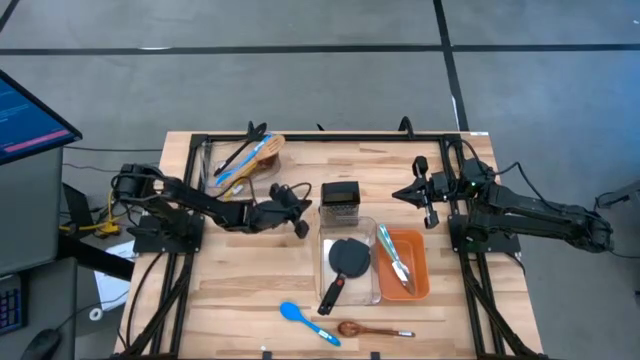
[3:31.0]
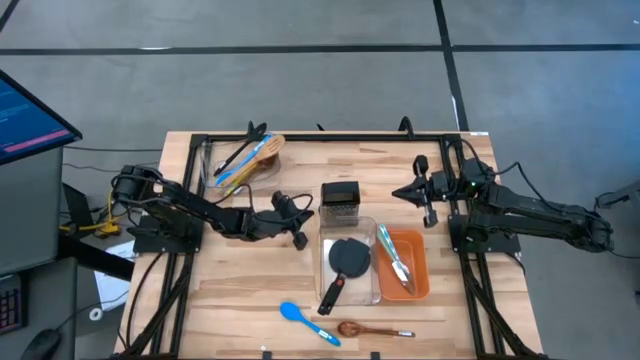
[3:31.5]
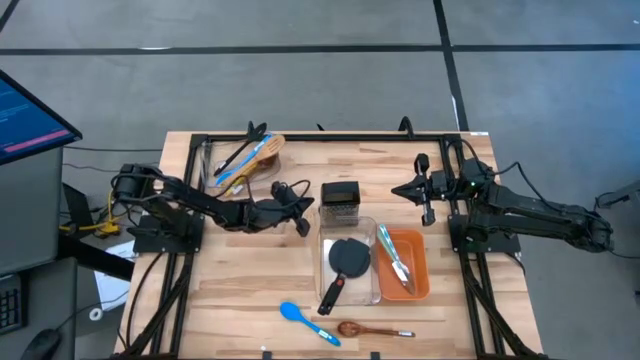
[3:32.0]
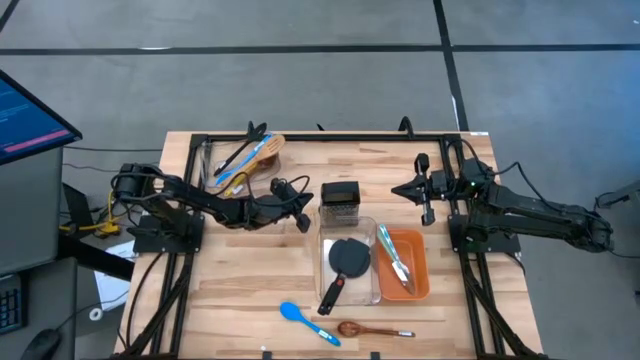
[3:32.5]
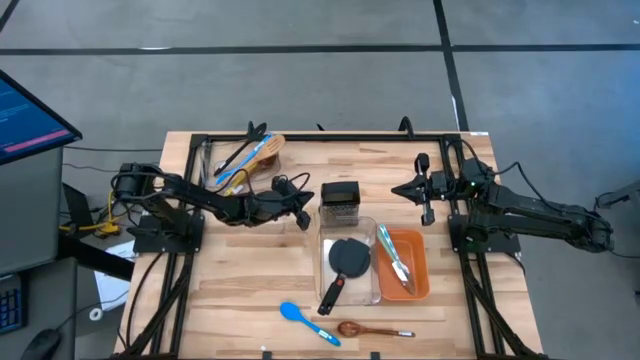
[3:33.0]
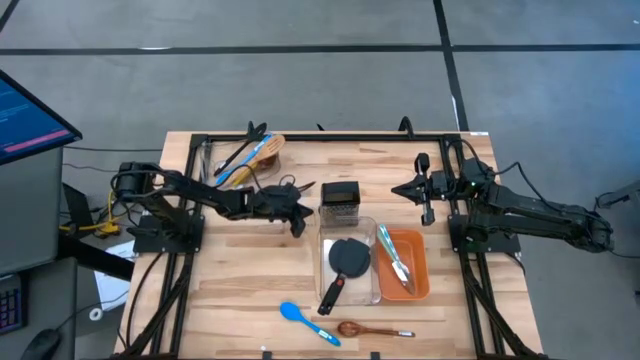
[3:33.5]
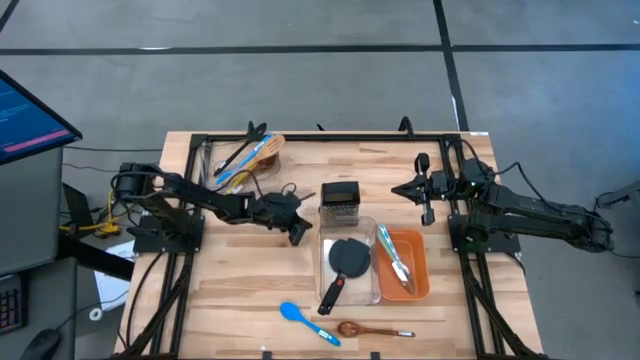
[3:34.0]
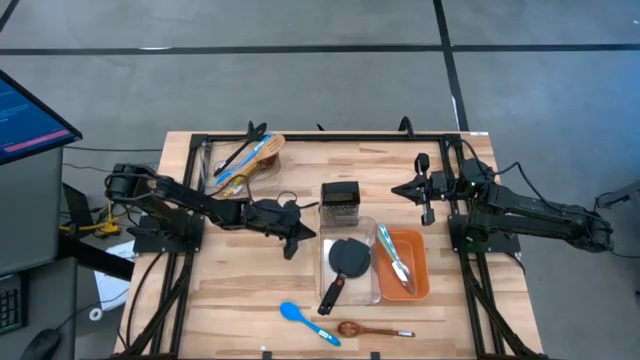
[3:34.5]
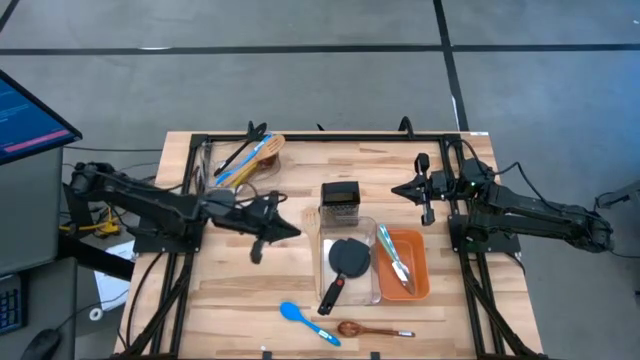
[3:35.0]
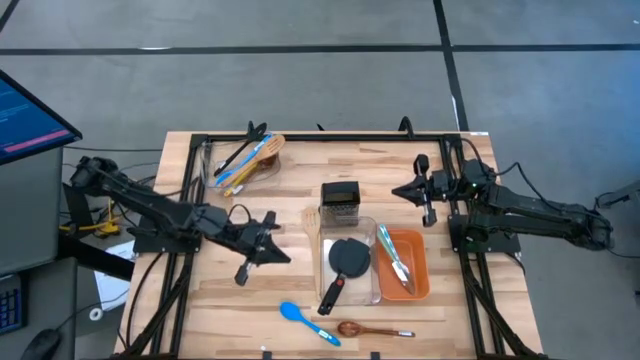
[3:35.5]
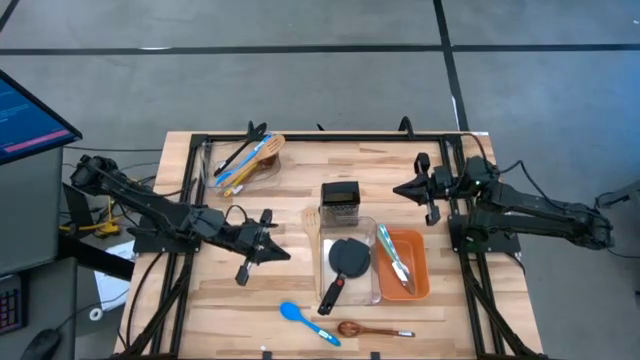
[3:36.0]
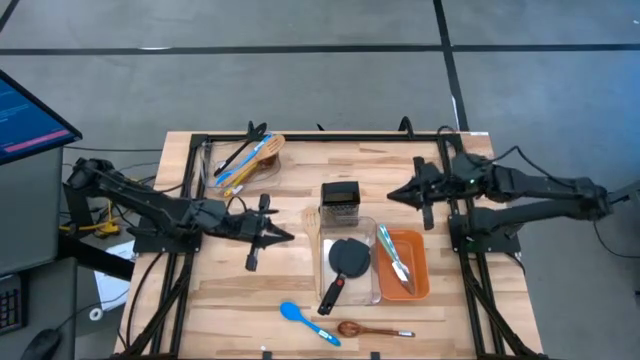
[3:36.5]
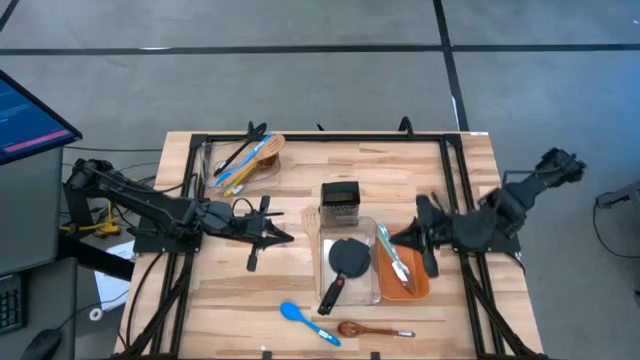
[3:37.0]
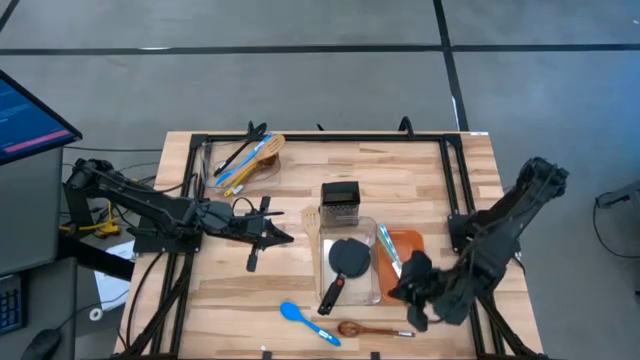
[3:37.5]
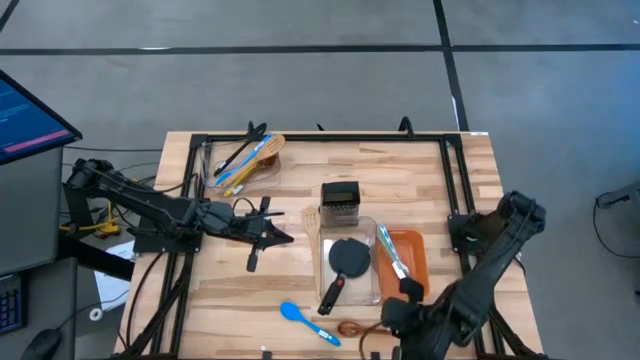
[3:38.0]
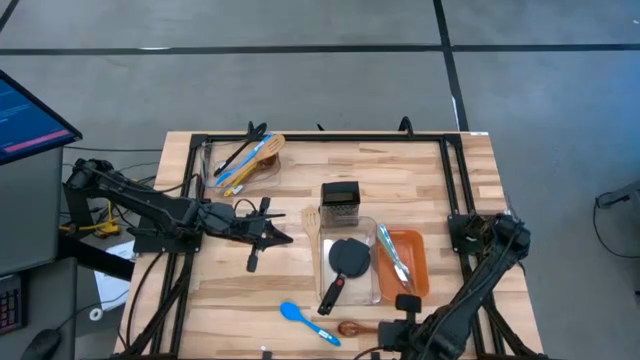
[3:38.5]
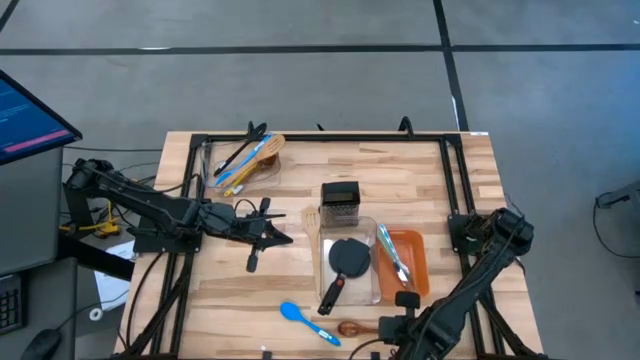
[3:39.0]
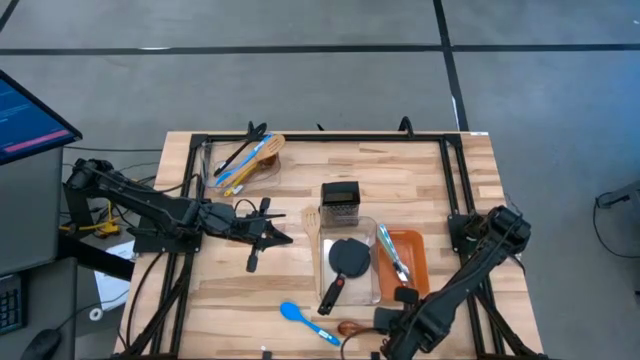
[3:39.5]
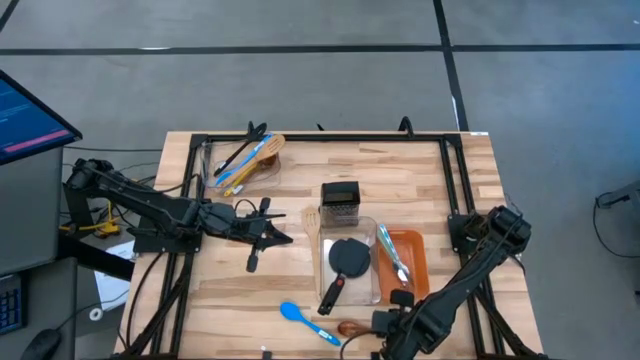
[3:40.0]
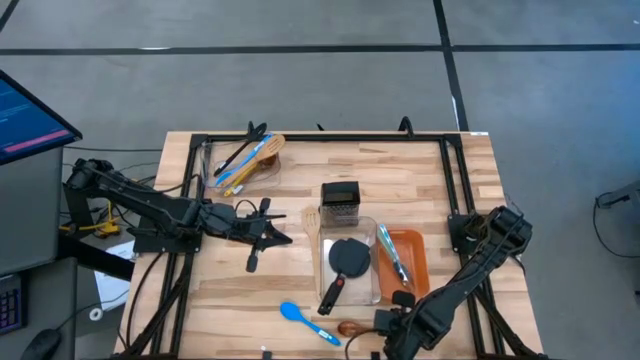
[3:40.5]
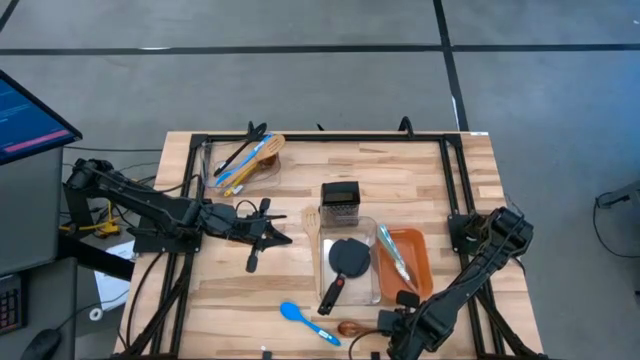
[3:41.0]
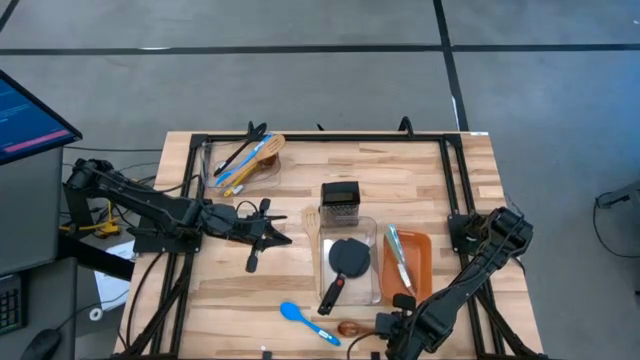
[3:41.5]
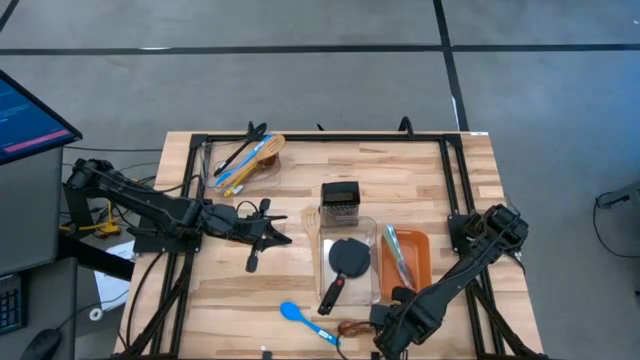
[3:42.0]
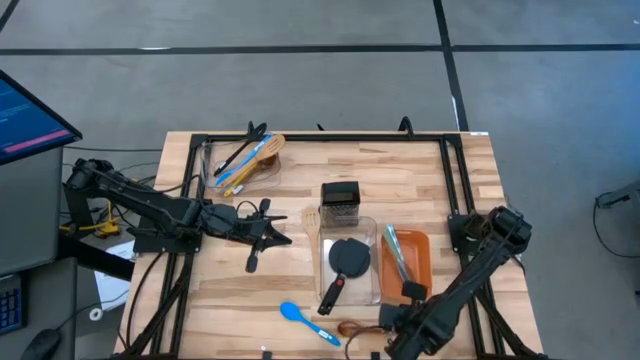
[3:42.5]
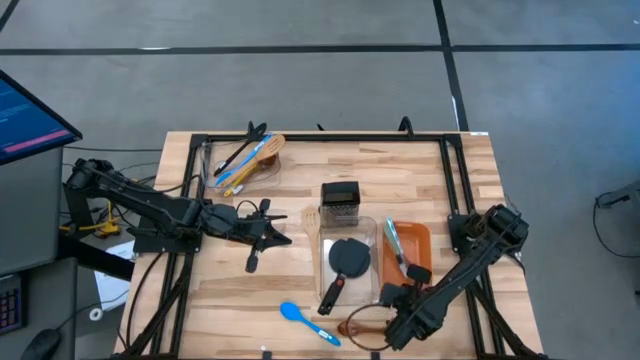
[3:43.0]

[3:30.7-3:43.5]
Task: Pick & Place Kitchen Items
Adjust the orange bin on the table

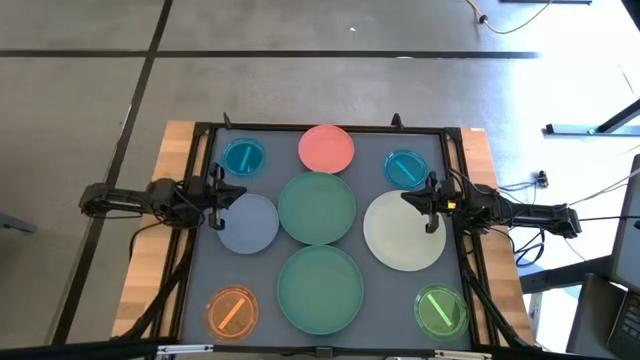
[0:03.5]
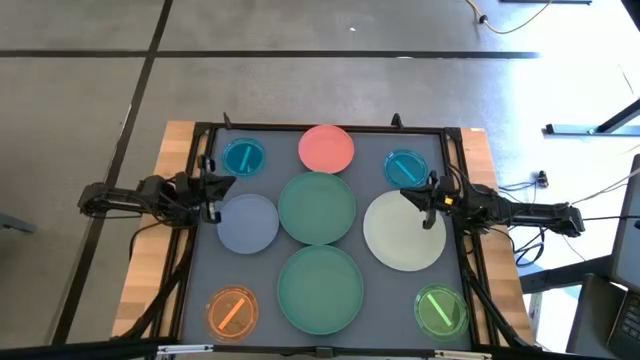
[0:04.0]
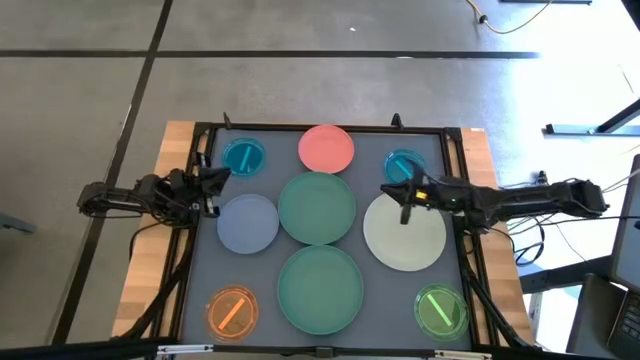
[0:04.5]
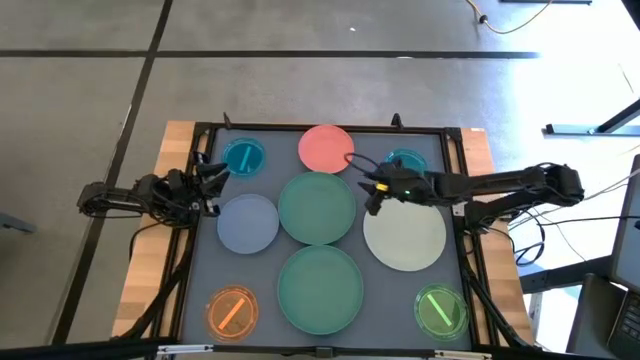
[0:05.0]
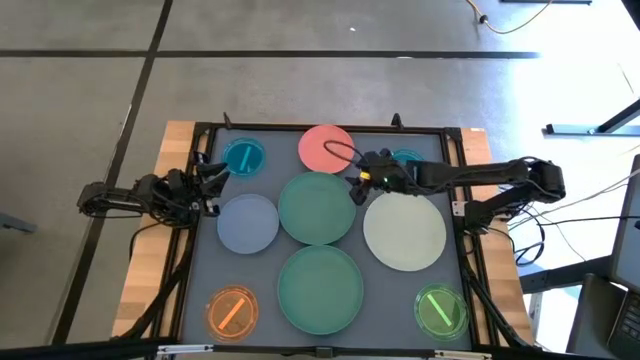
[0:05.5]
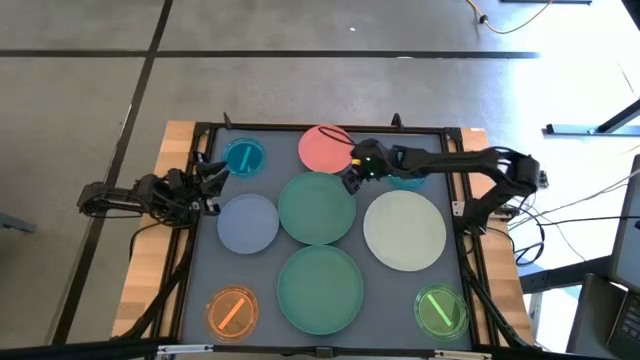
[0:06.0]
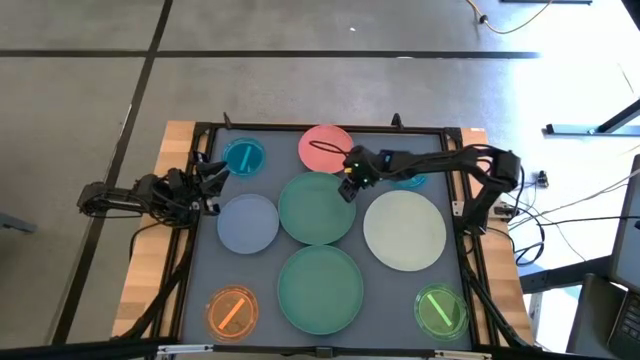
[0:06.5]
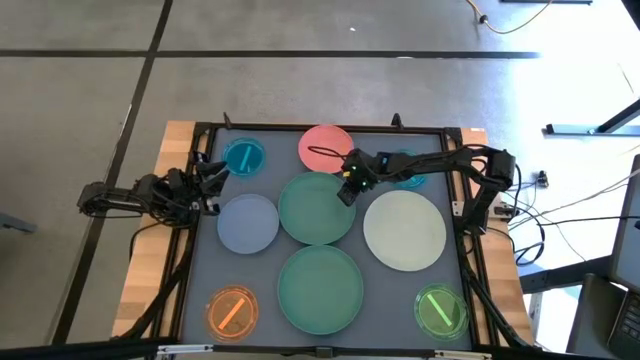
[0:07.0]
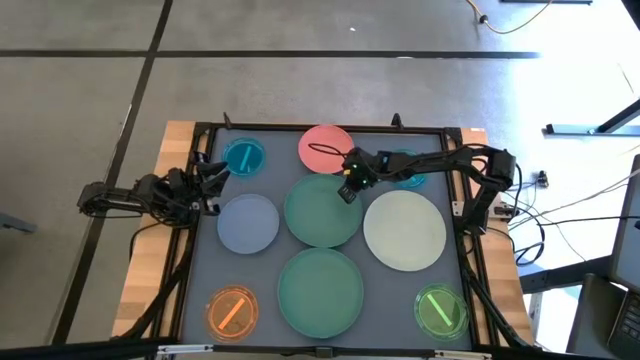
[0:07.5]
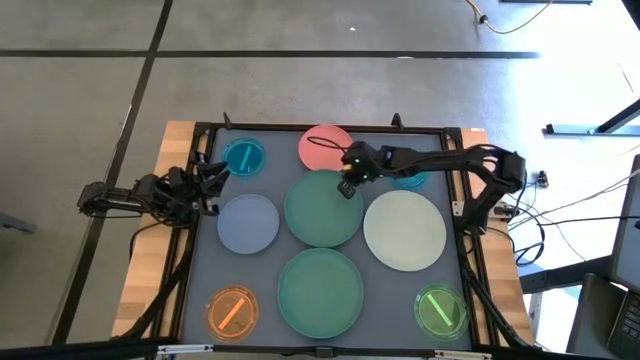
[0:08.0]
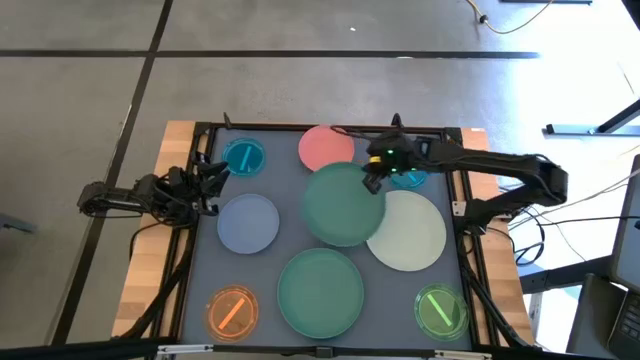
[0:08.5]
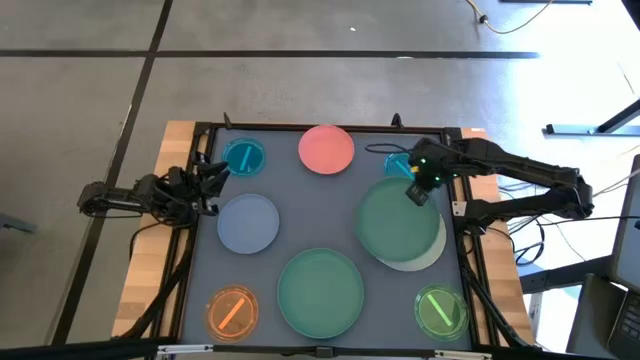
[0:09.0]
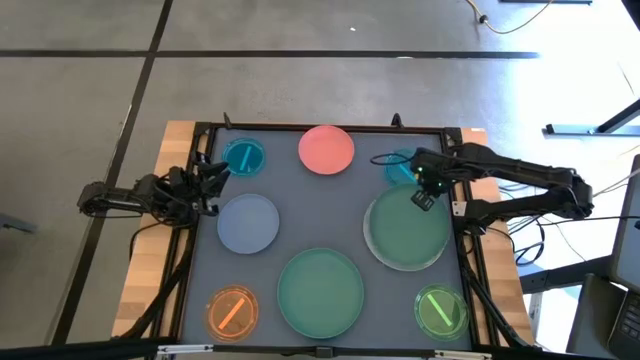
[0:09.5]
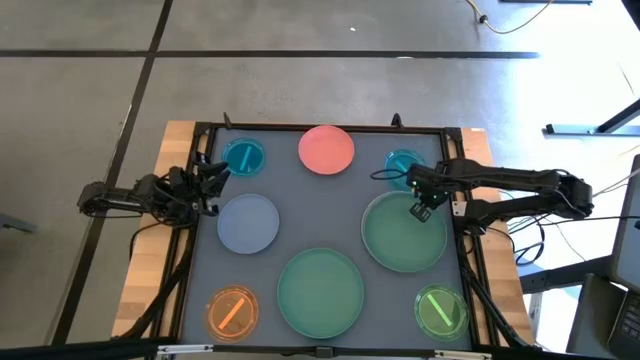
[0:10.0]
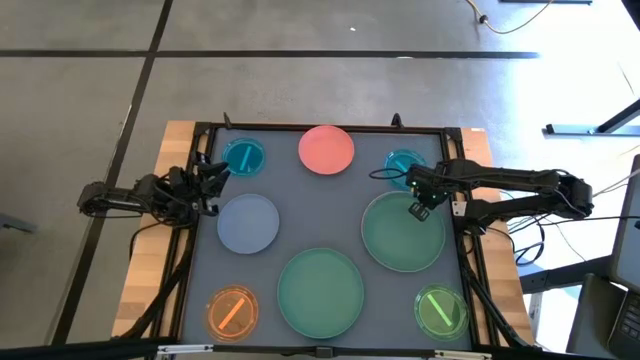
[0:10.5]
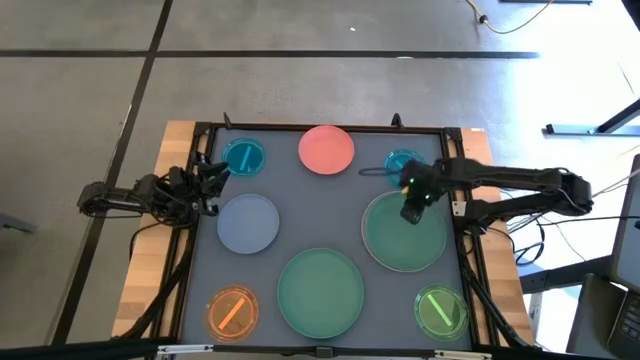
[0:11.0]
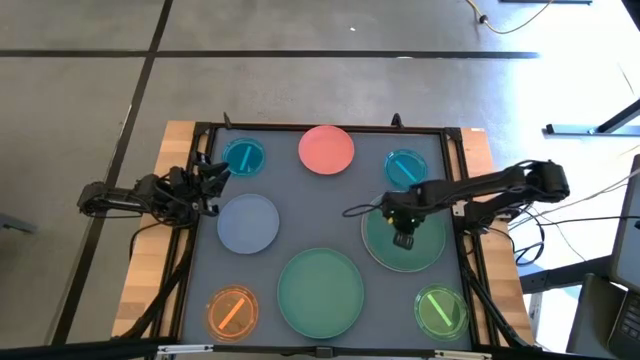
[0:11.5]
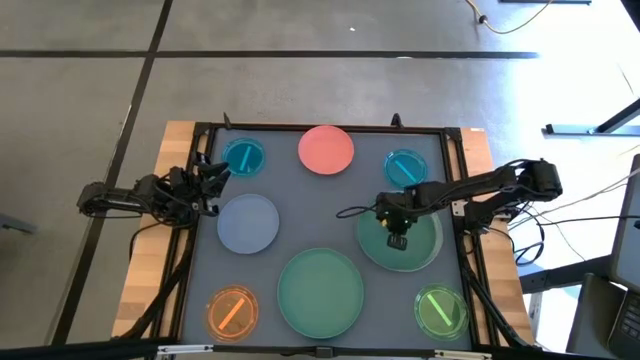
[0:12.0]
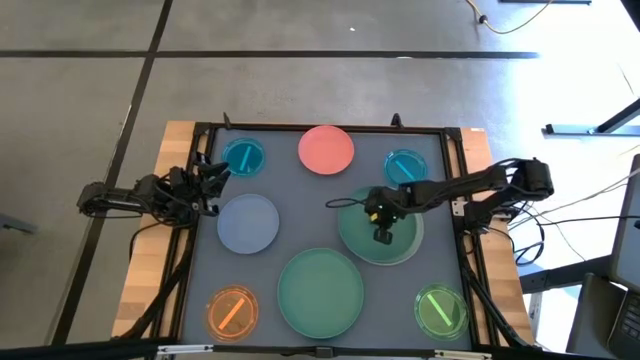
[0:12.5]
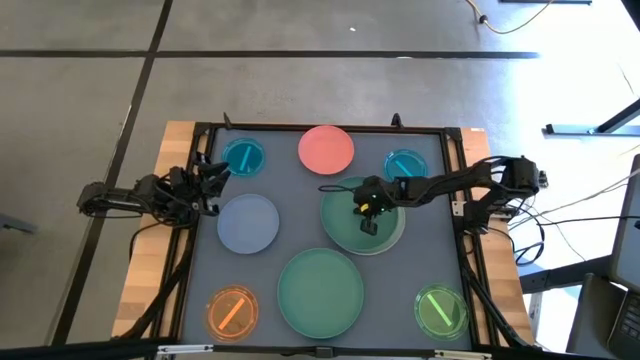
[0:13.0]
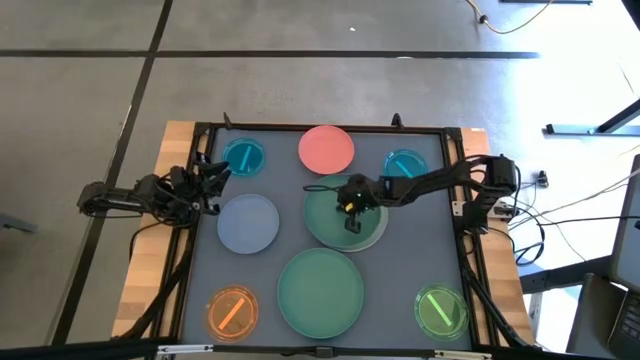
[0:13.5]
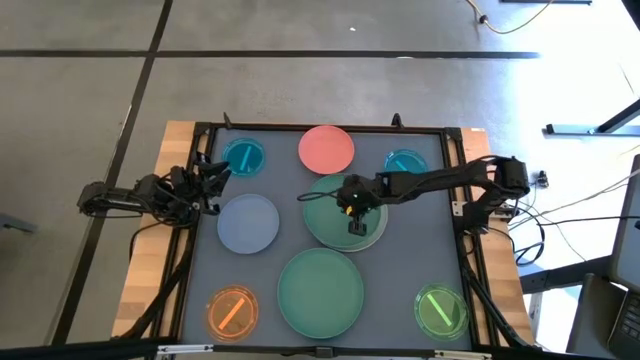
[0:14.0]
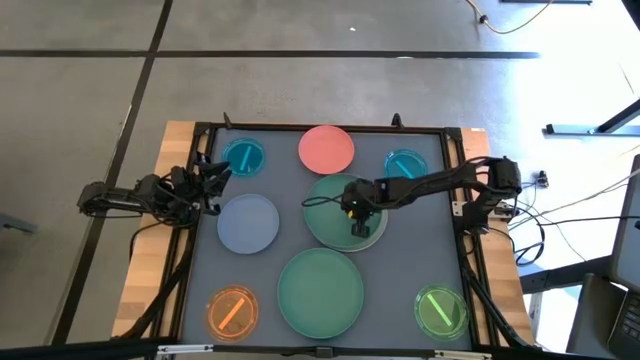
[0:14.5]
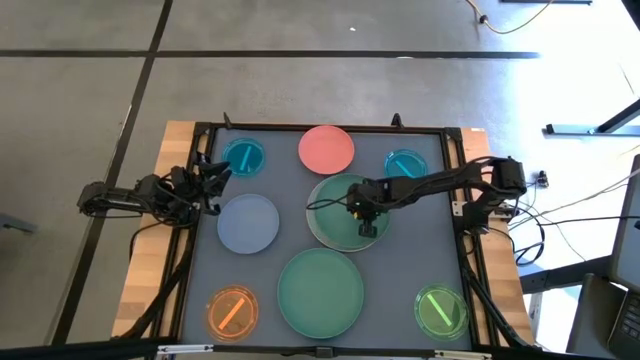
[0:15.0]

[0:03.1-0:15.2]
Task: Stack plastic plates
Stack the top green plate on top of the white plate
